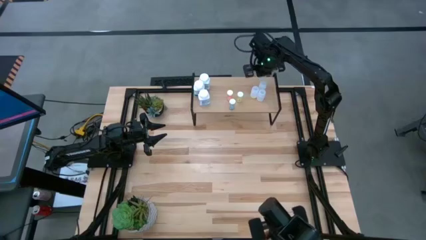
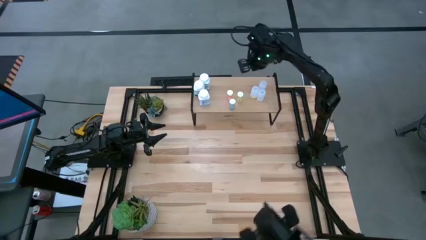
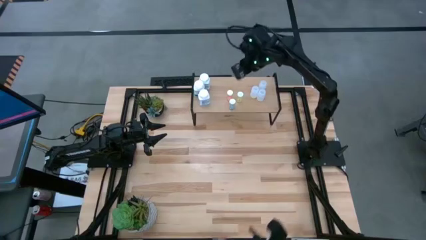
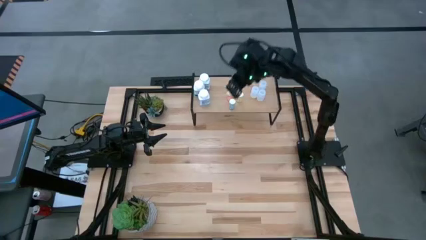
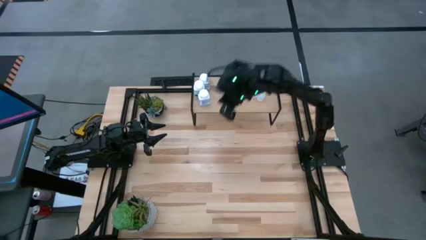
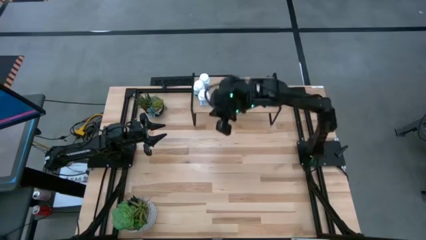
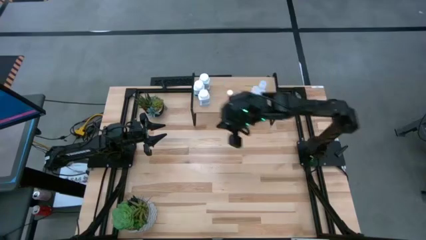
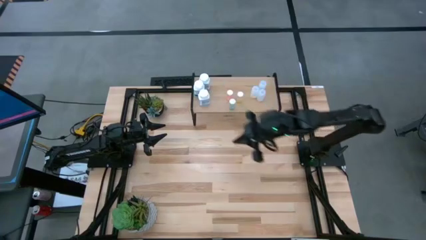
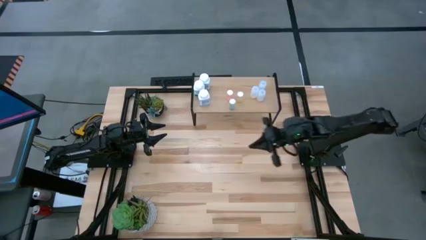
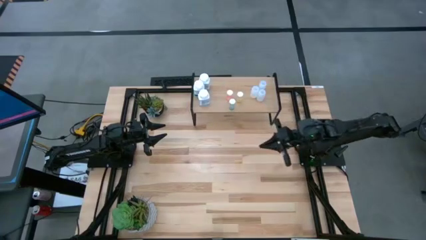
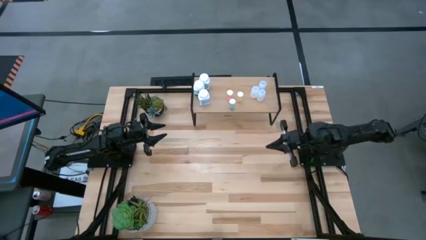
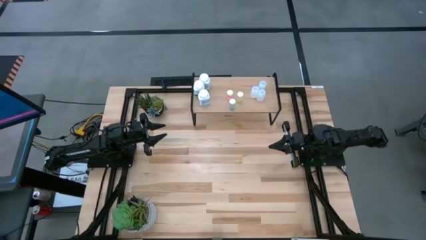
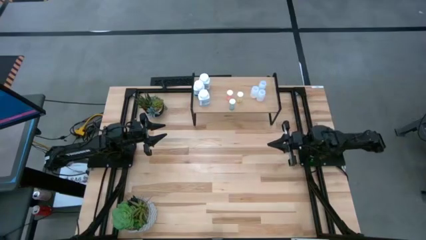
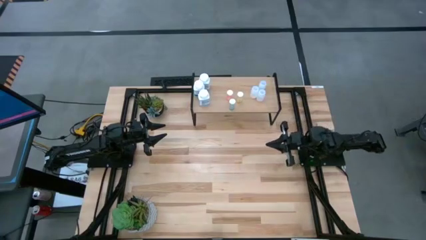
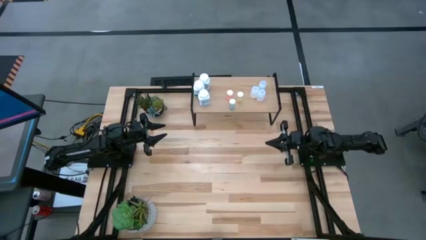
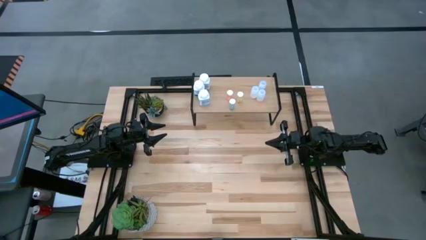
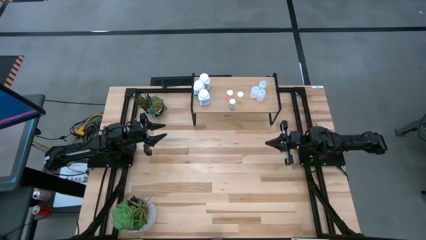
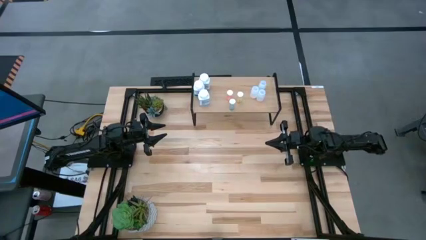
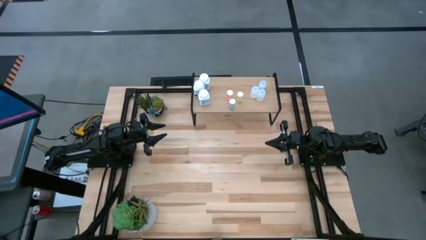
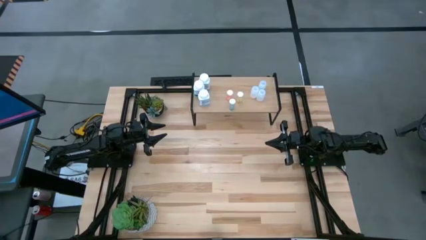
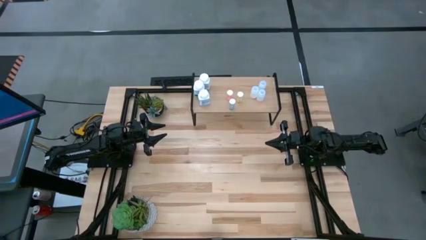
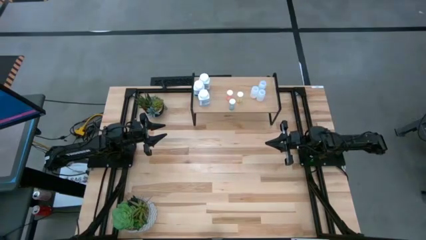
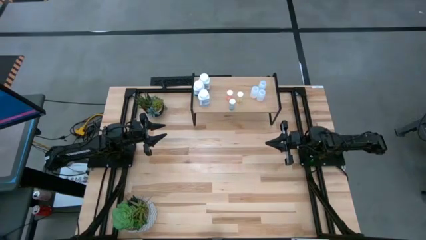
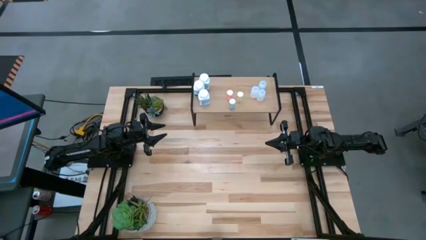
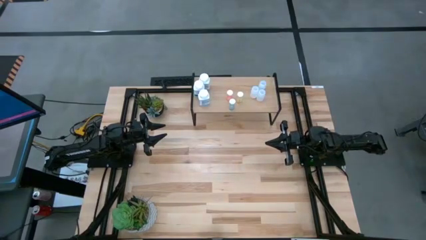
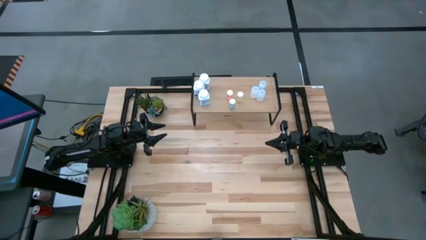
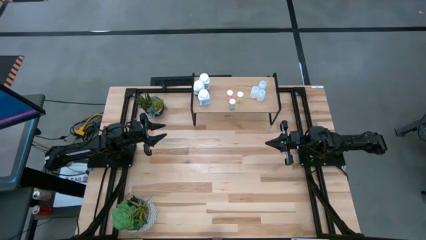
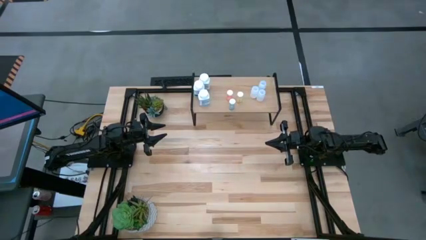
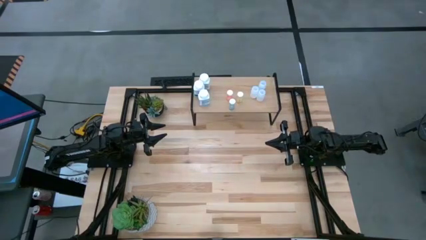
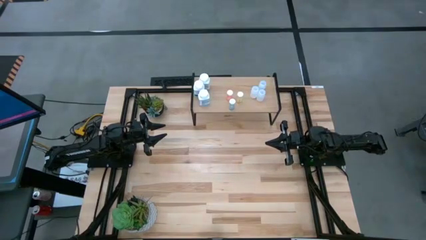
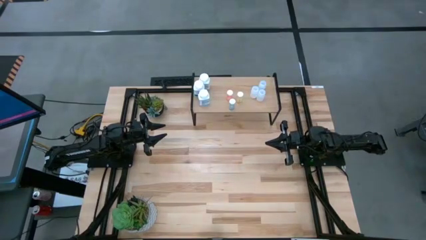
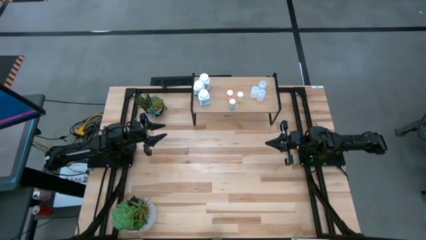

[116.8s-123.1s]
Task: Pick and place medicine bottles onto shelf by color
Return to Home Position

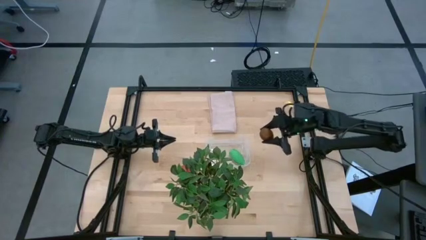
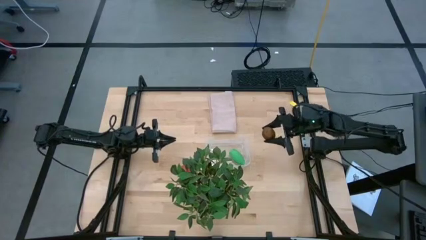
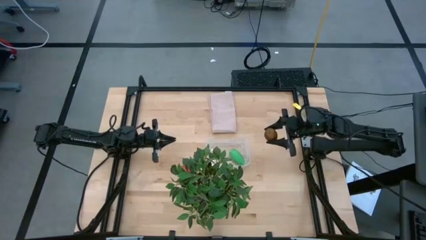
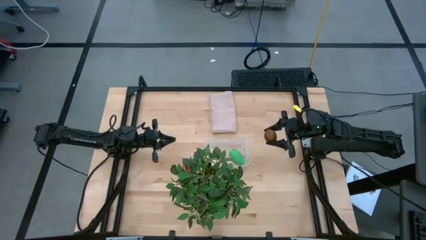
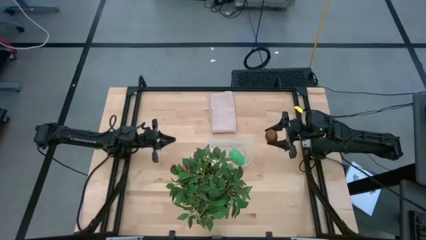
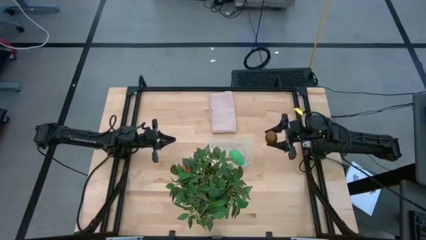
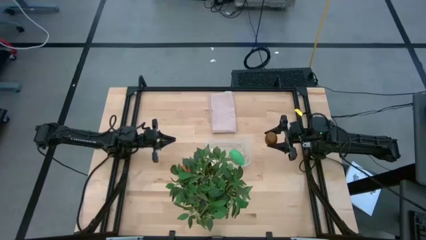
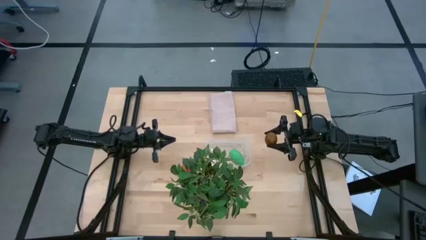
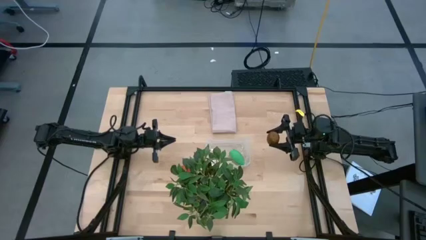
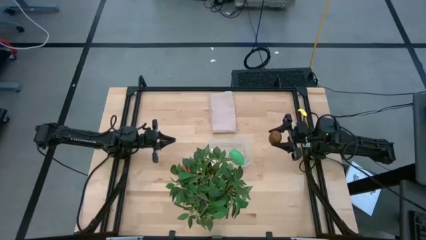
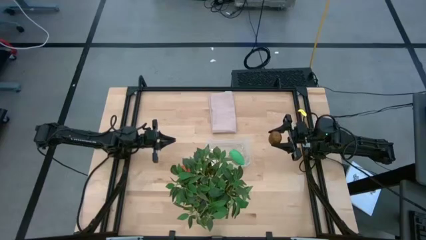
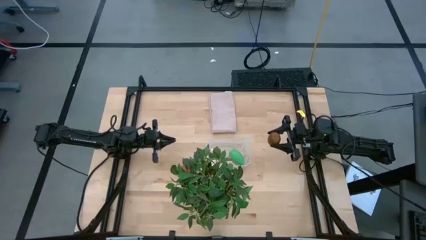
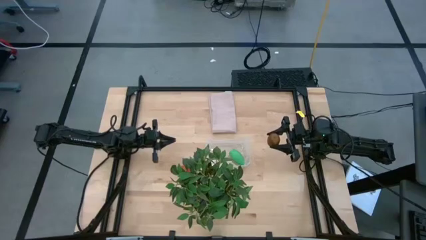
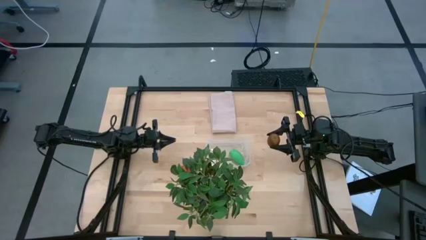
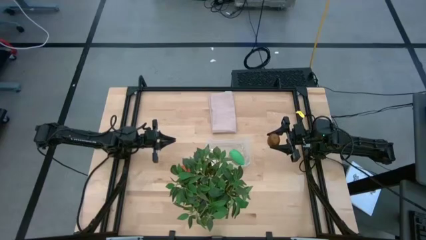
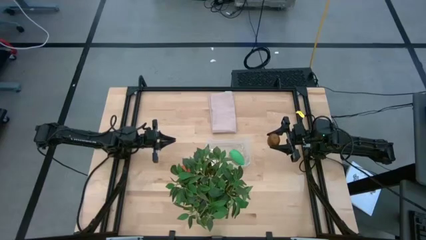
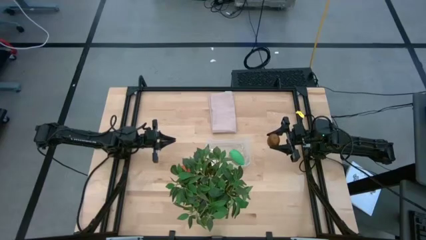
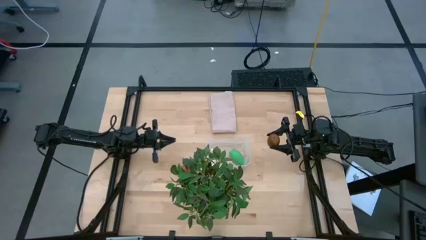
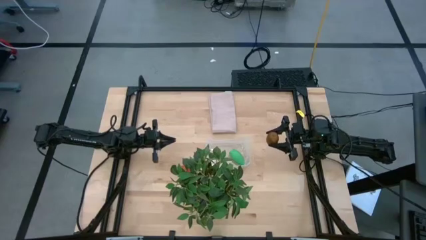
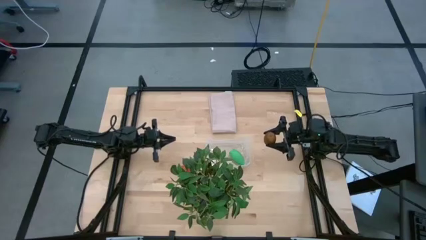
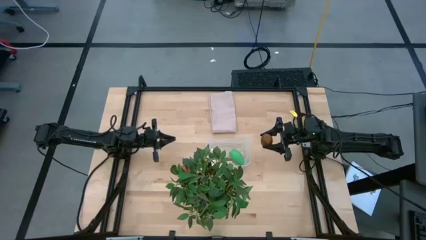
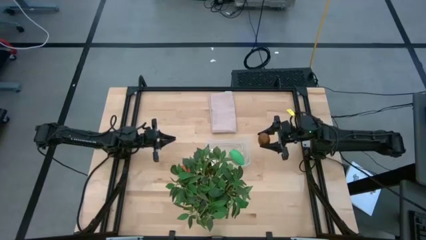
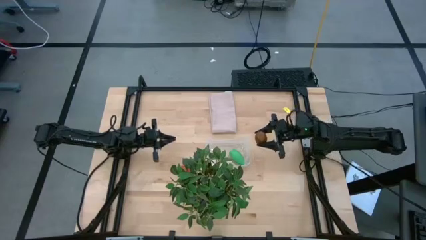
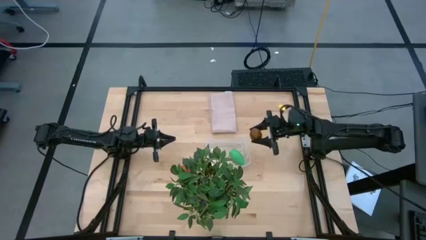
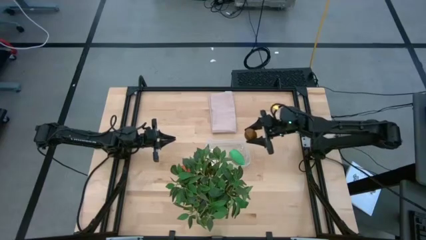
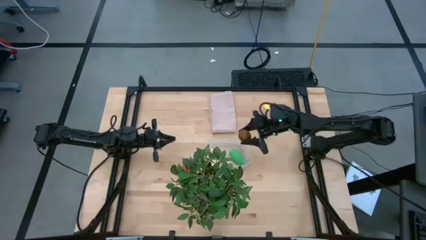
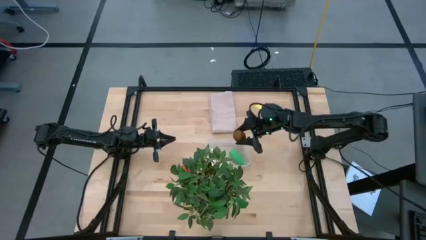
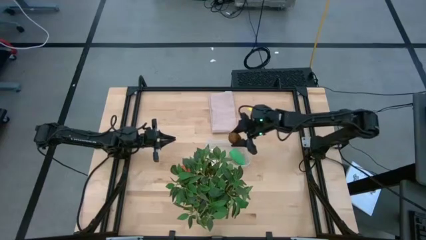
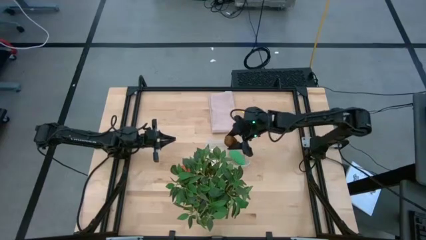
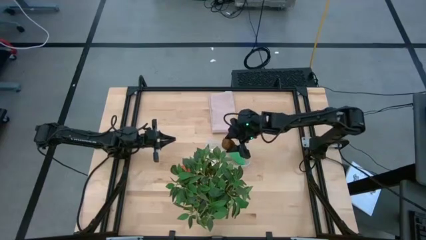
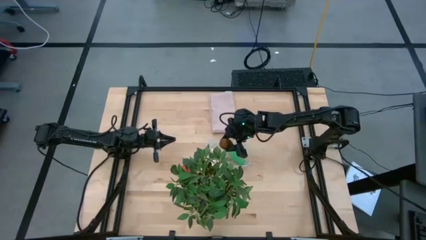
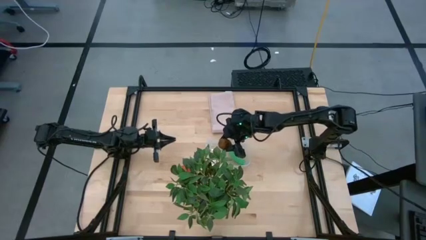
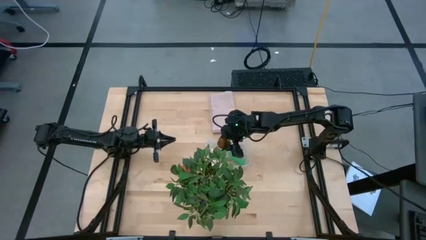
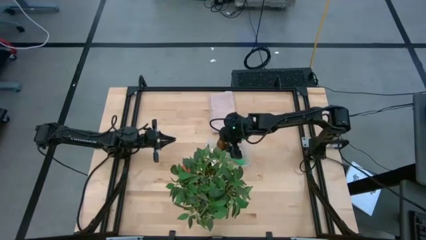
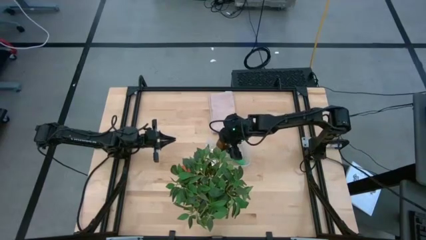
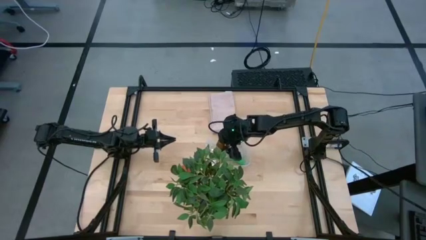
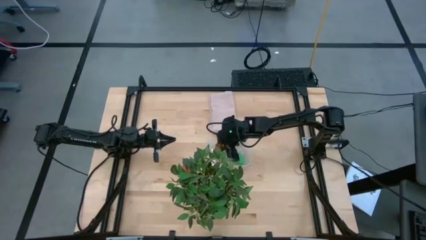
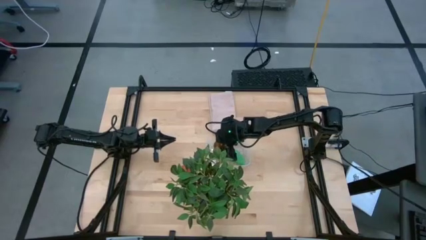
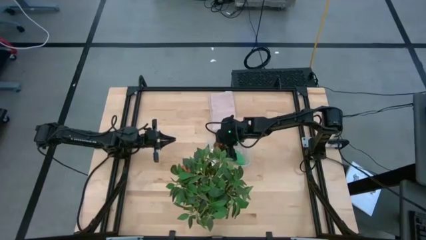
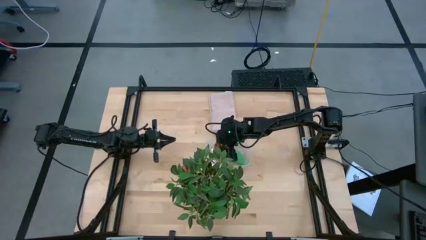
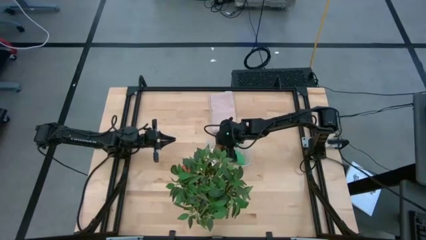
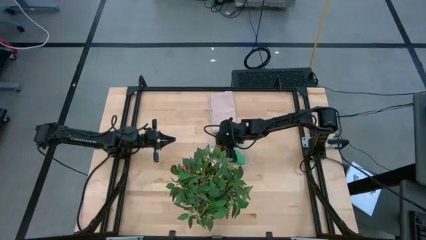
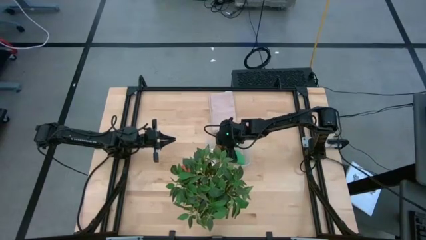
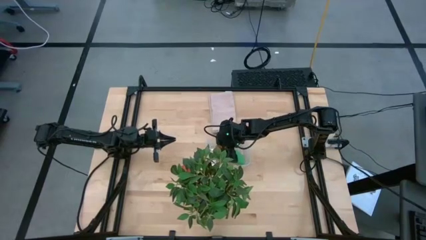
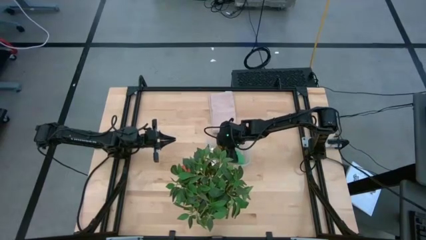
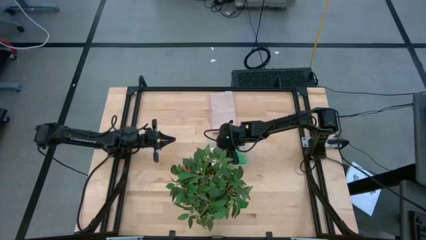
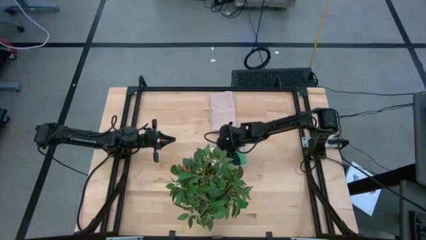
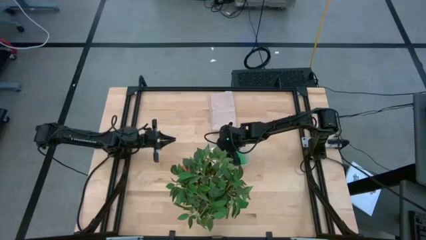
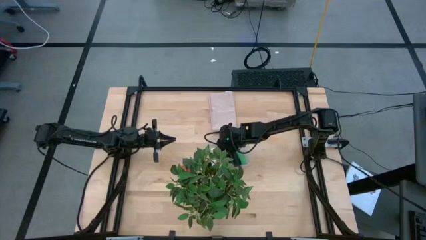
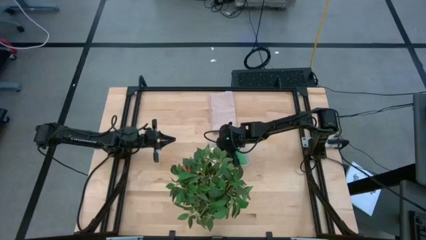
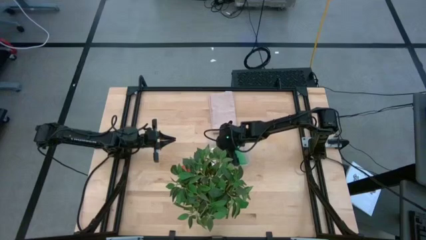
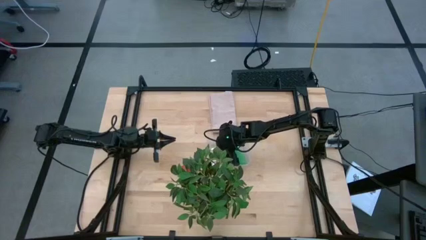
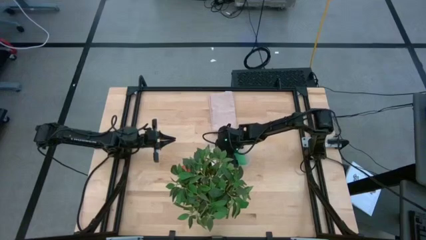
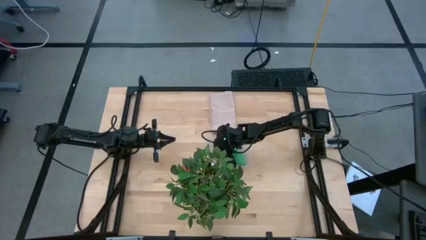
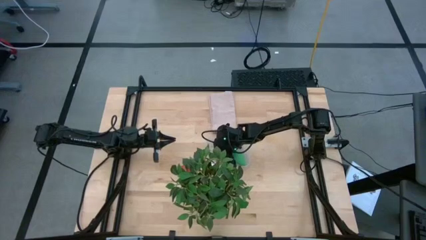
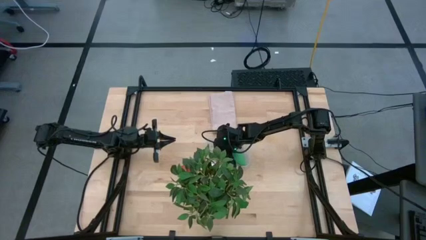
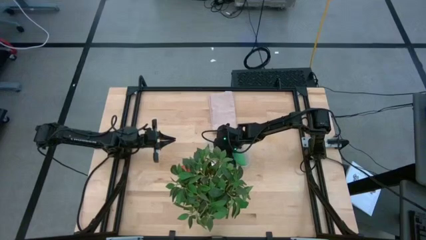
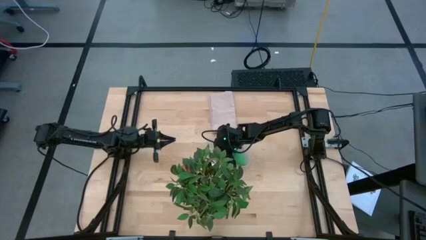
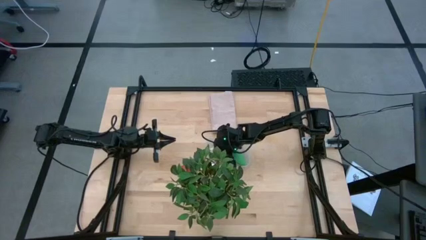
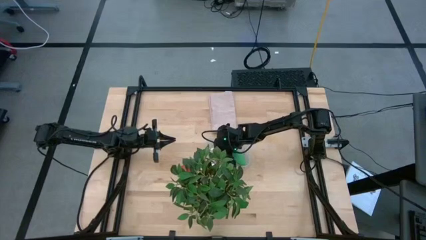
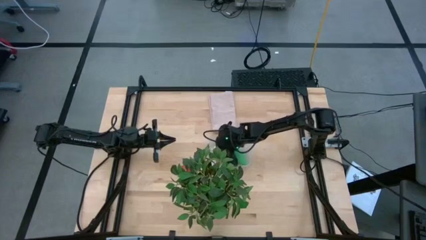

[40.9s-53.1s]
Task: Pick and placing Produce into tupperware
Put the kiwi into the transparent bin
